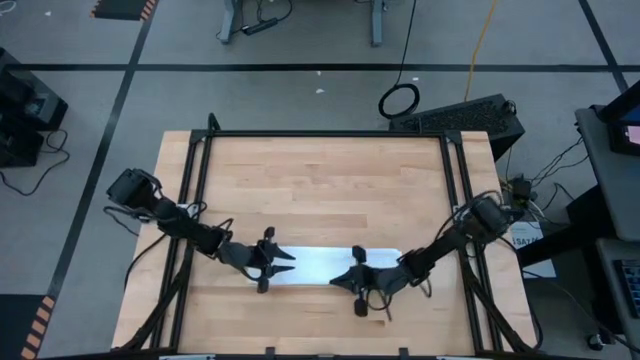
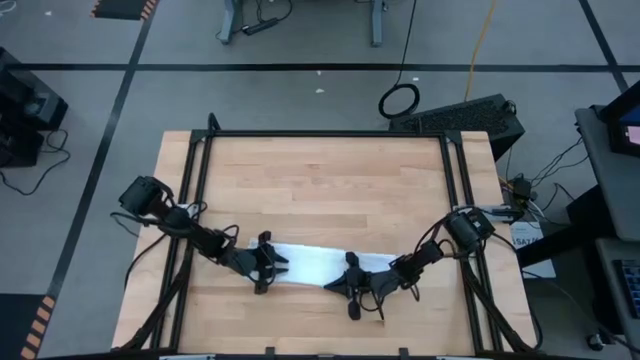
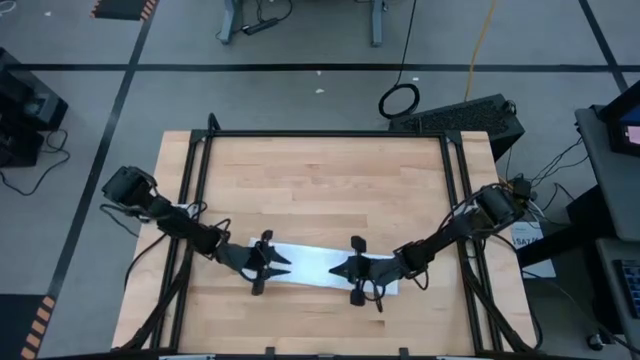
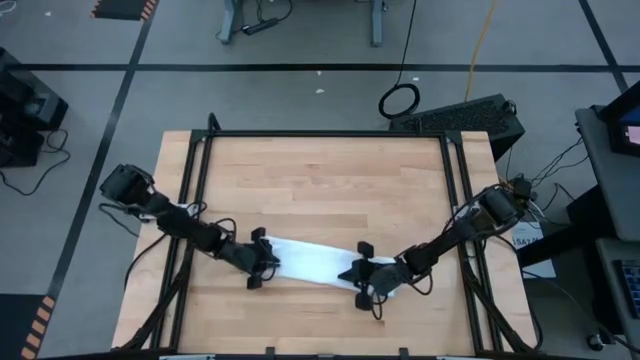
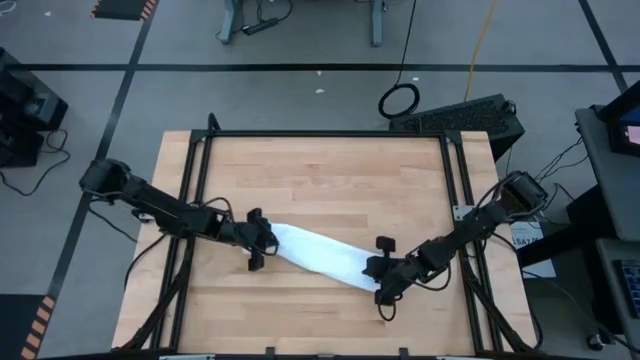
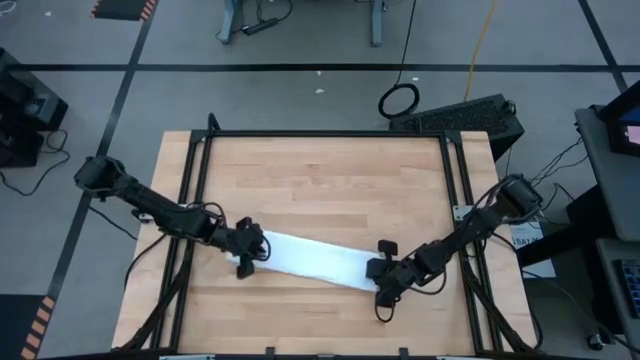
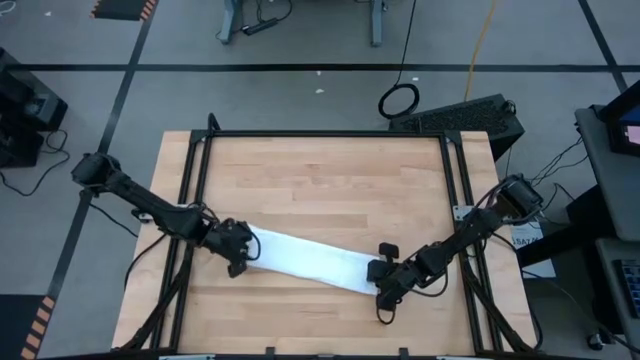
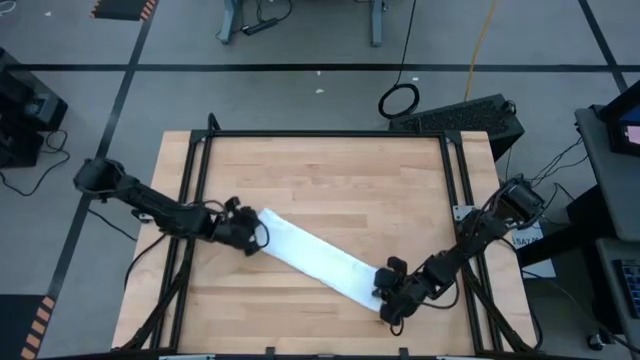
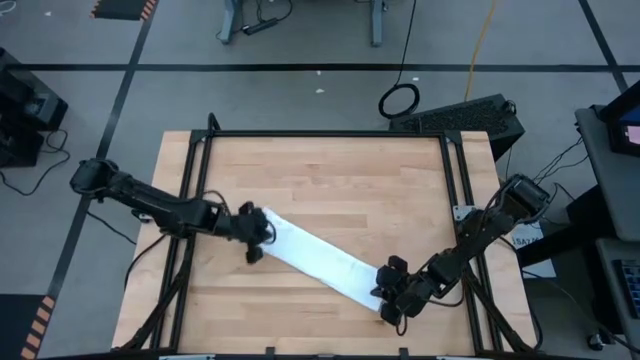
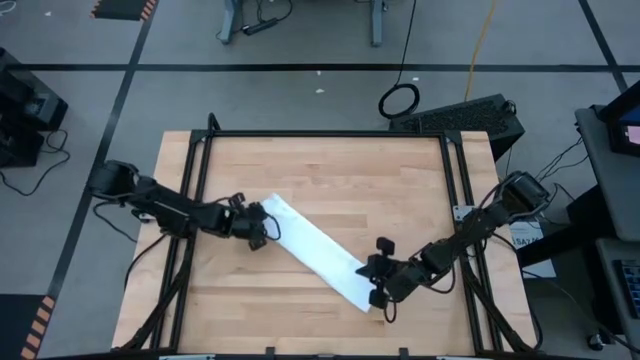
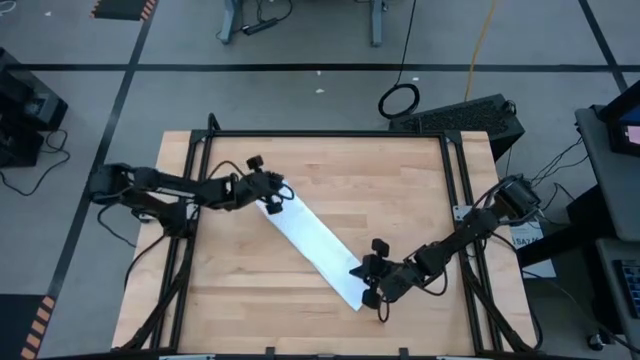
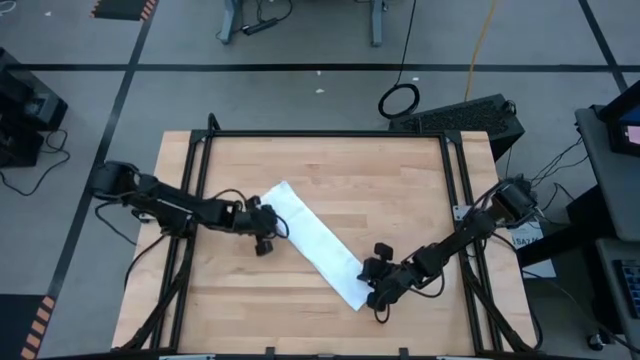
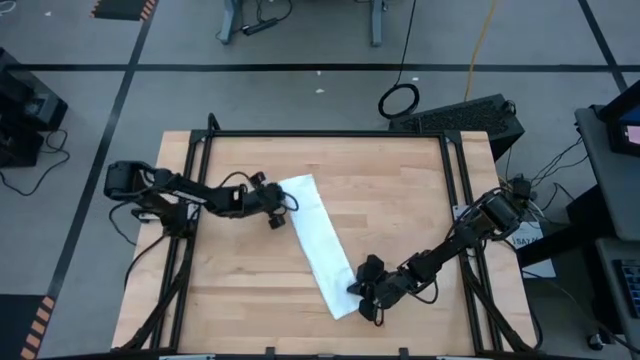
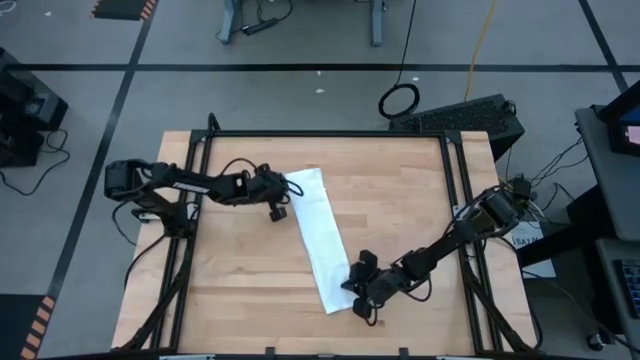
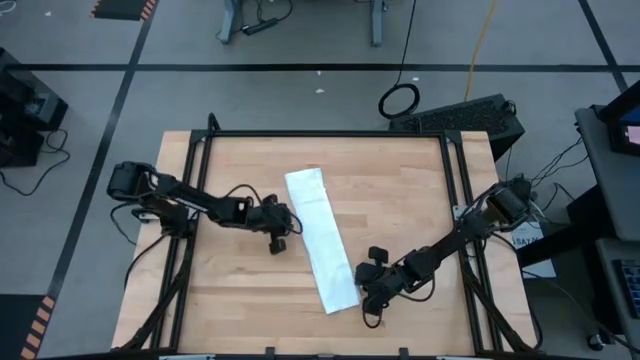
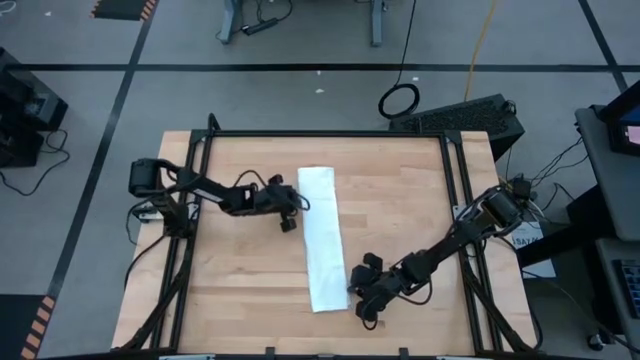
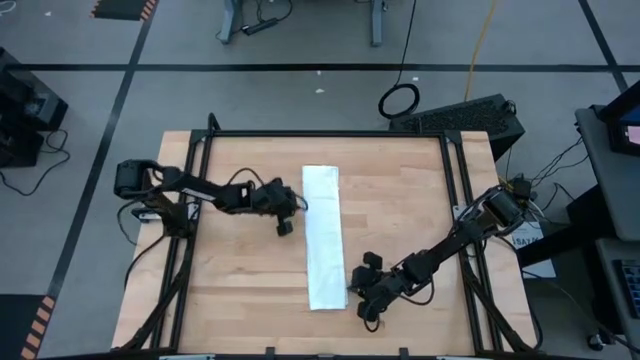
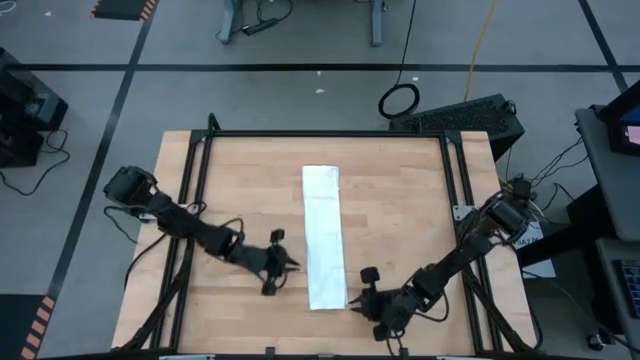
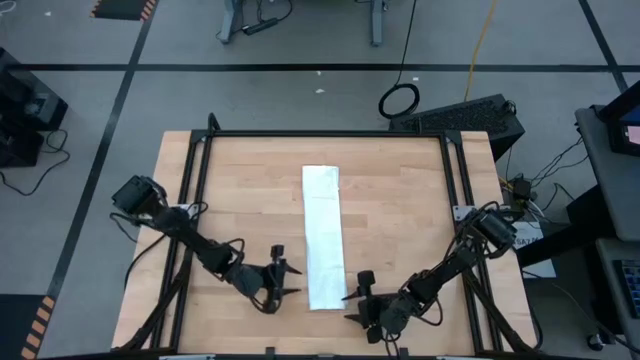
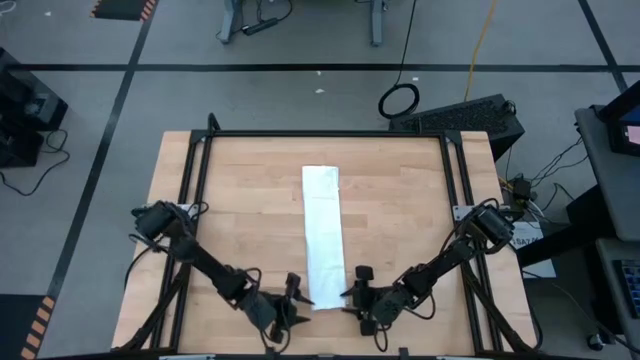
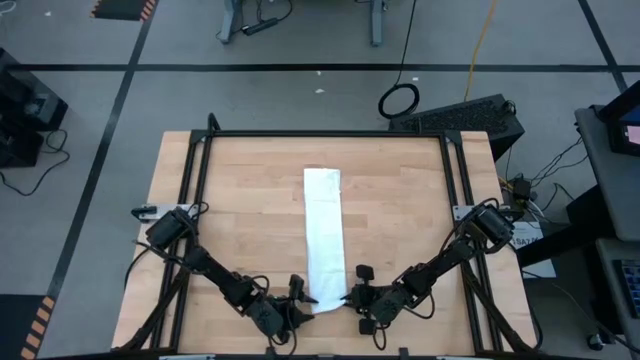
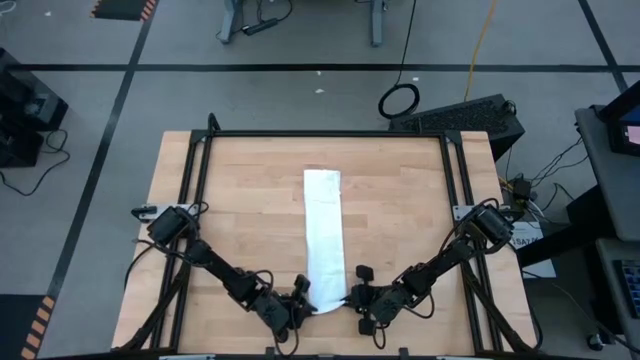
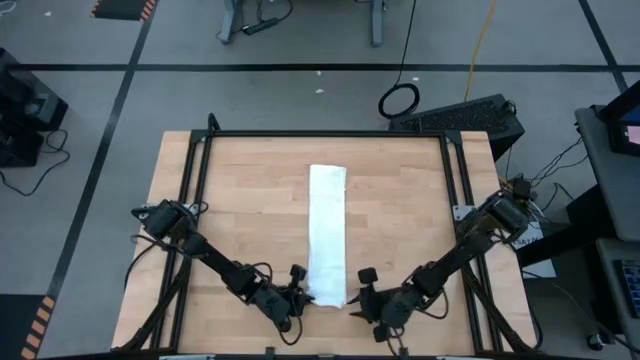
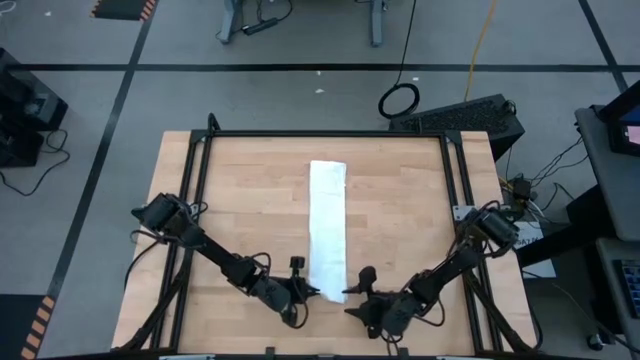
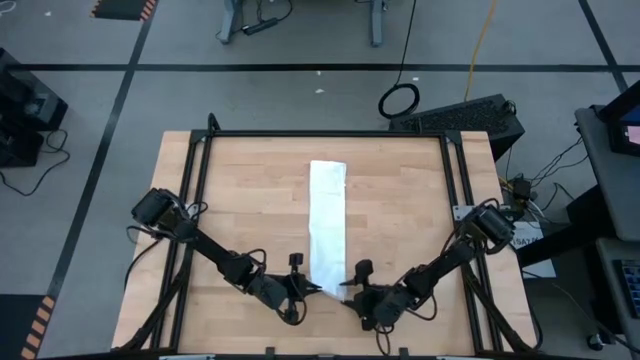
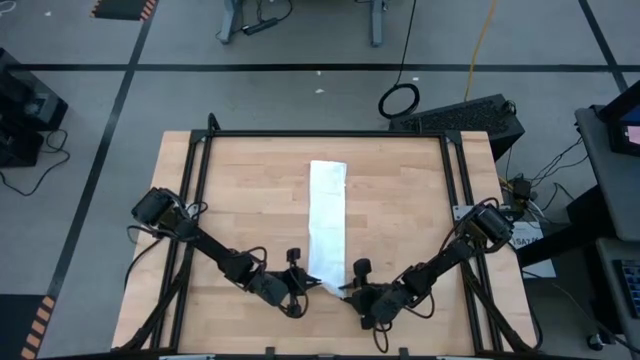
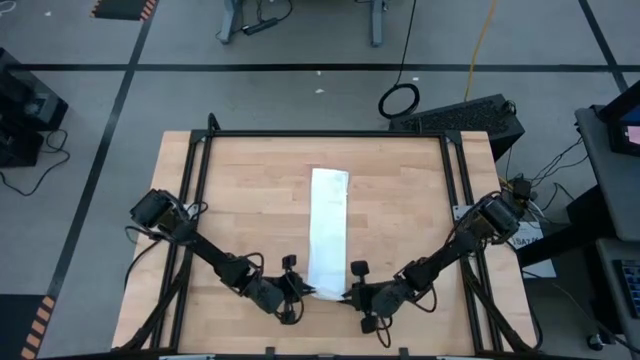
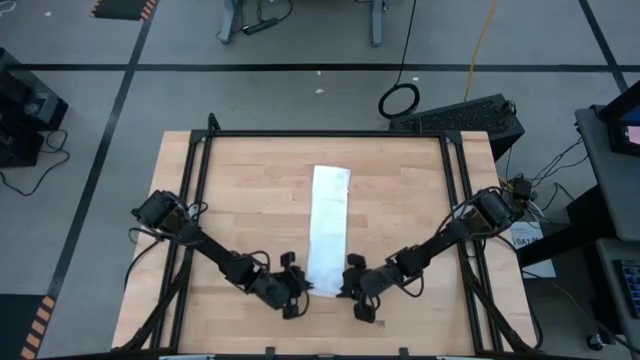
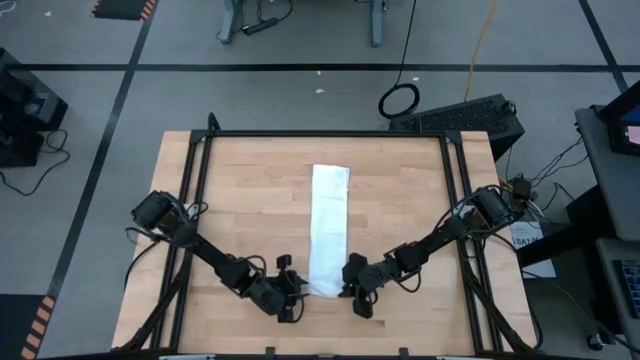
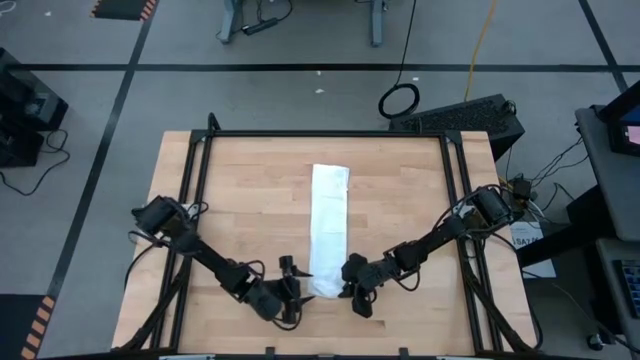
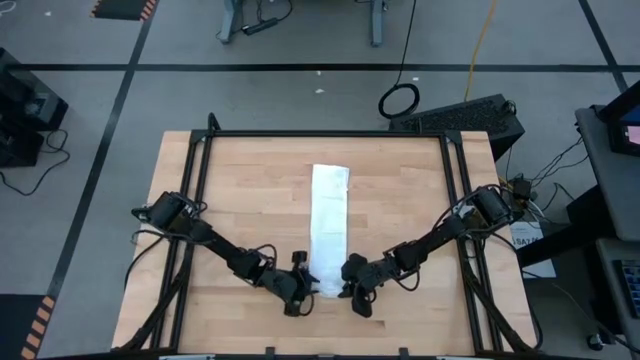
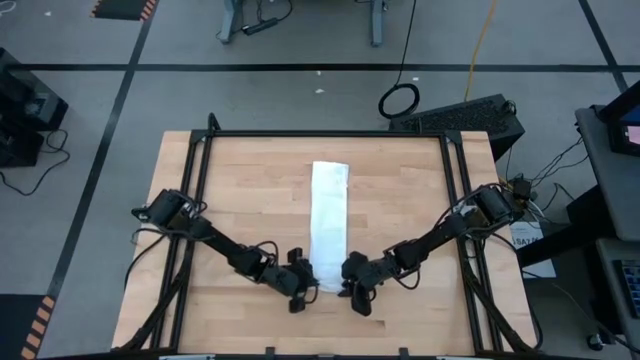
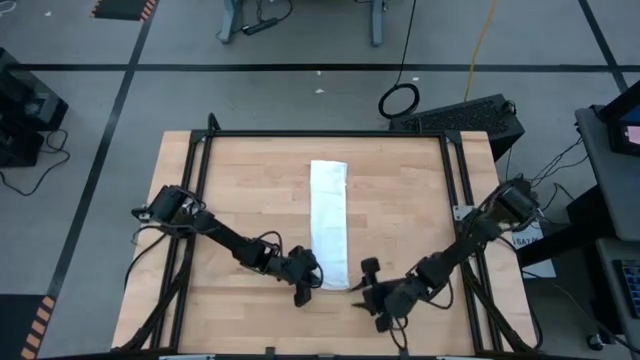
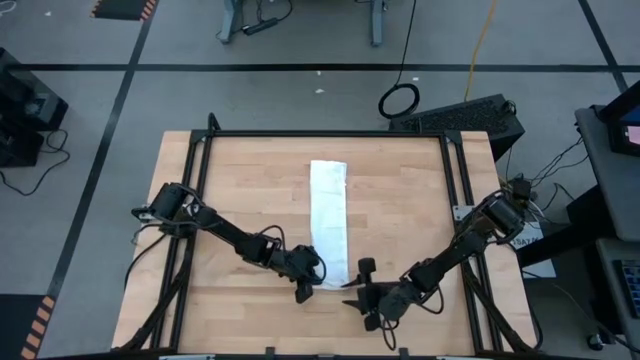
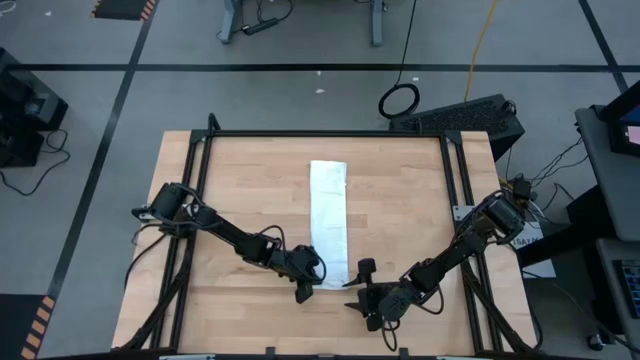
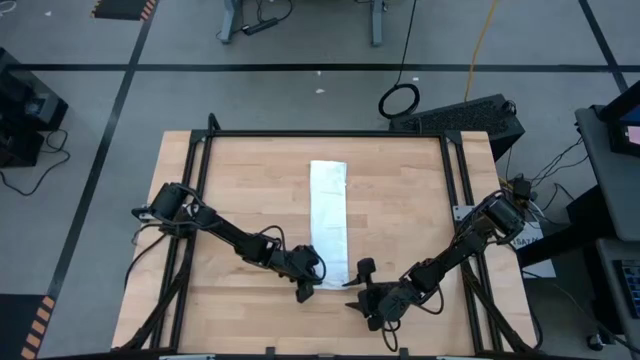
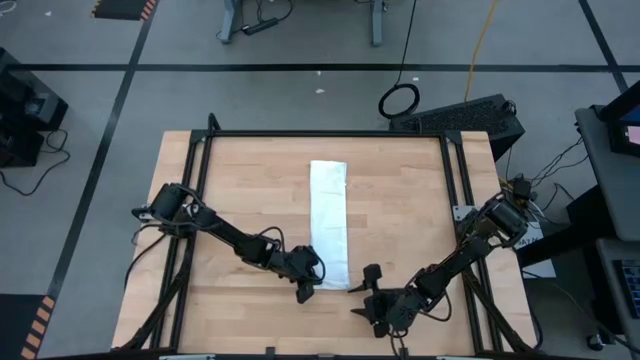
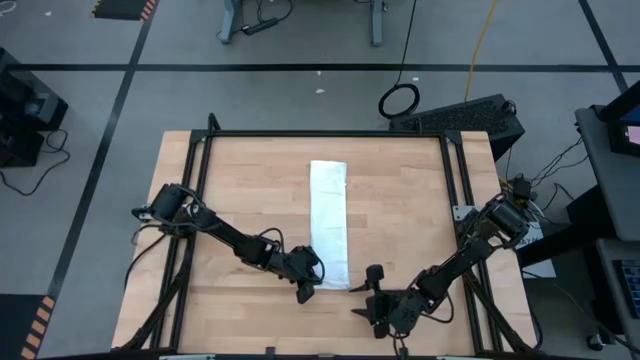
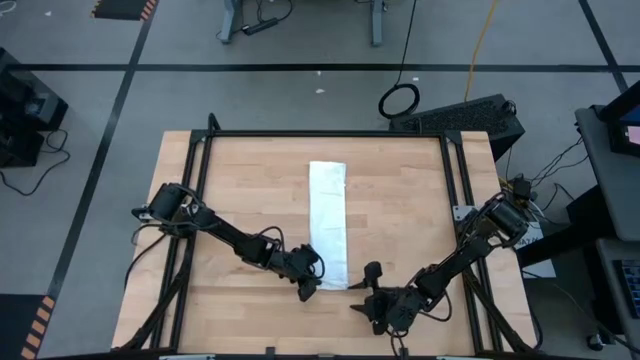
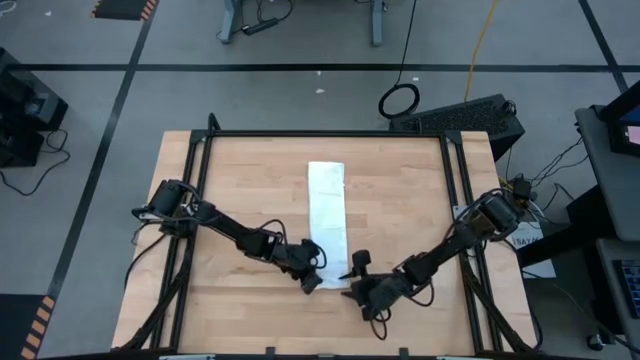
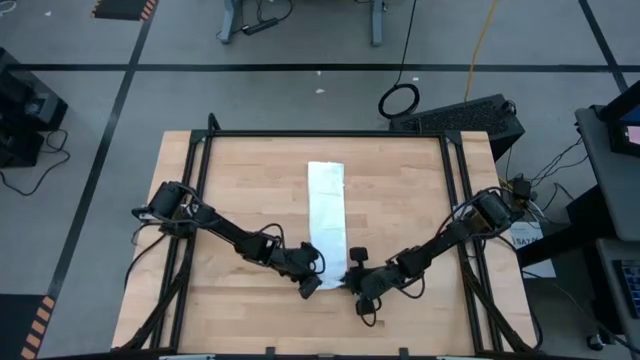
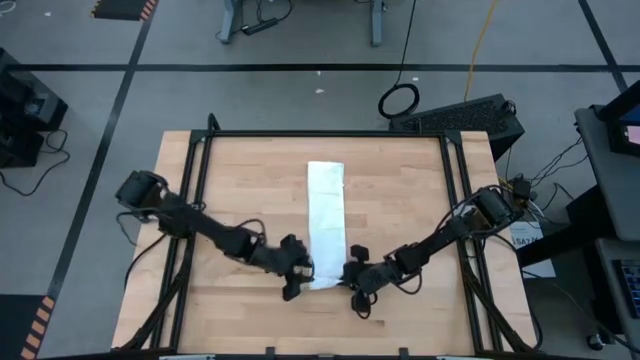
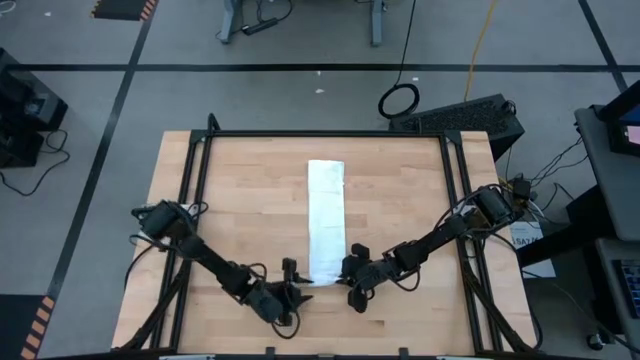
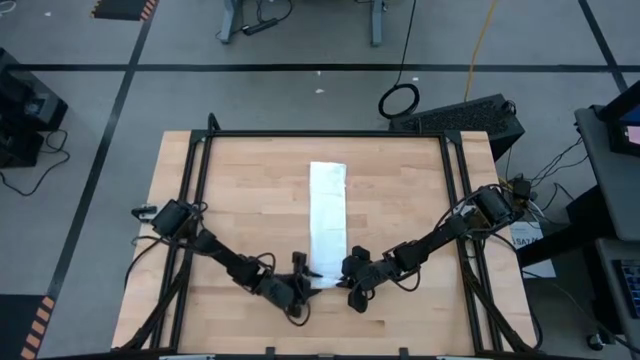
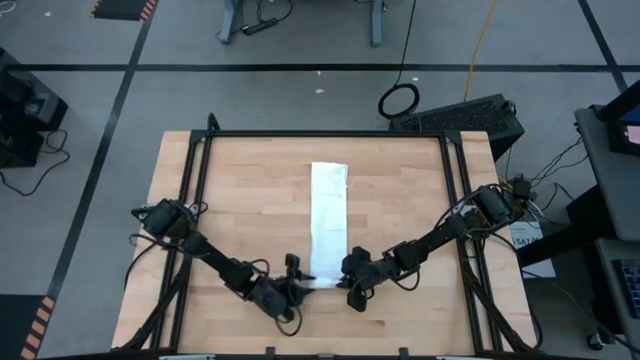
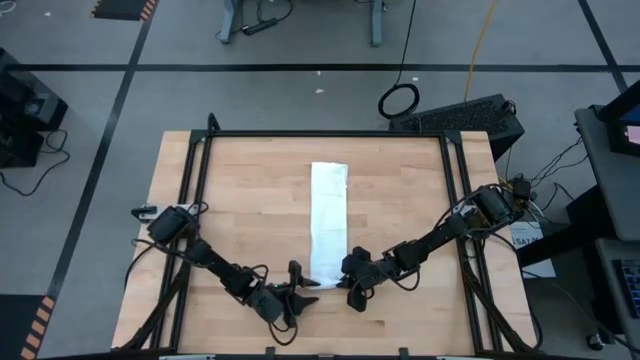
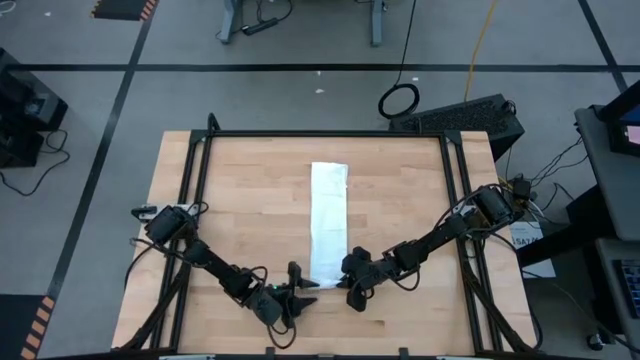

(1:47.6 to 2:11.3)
Task: Roll napkin
Roll the white table napkin
